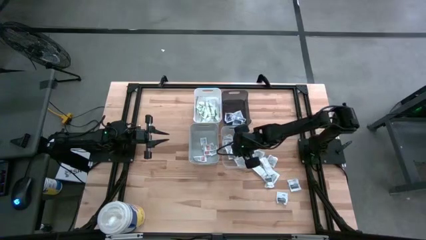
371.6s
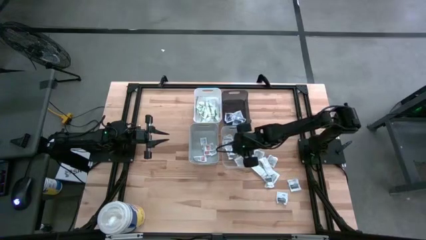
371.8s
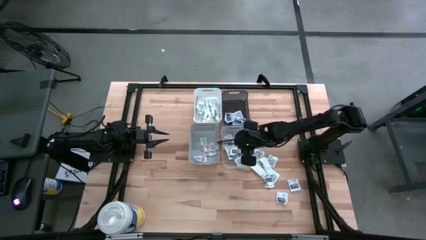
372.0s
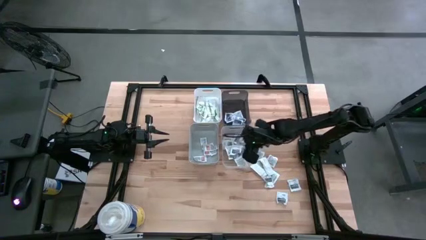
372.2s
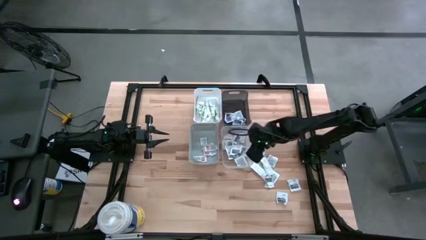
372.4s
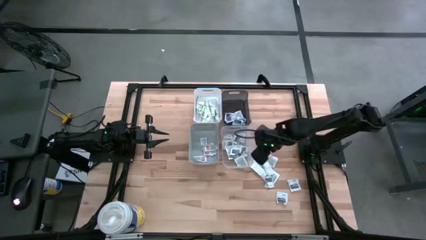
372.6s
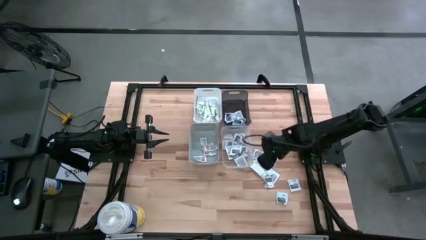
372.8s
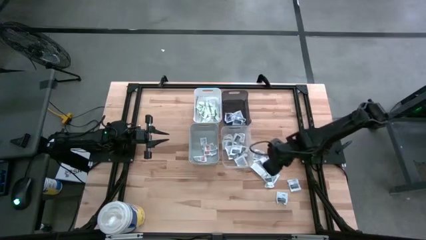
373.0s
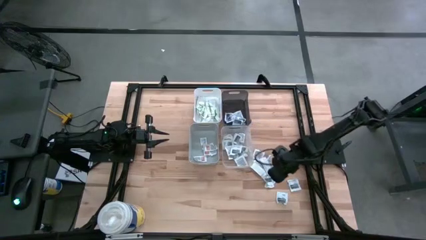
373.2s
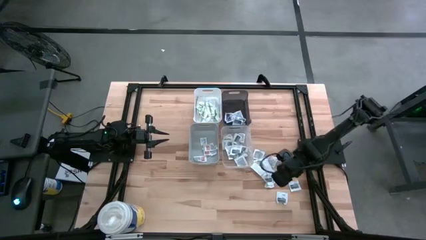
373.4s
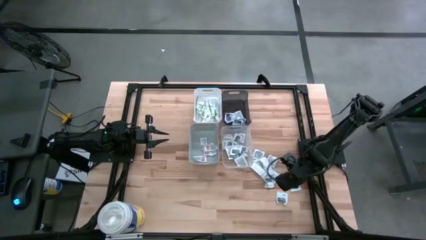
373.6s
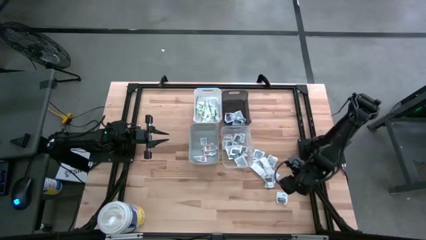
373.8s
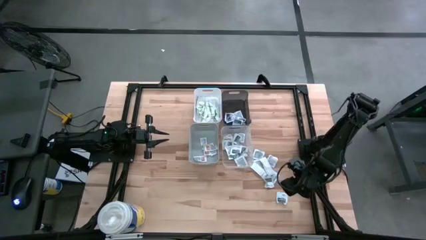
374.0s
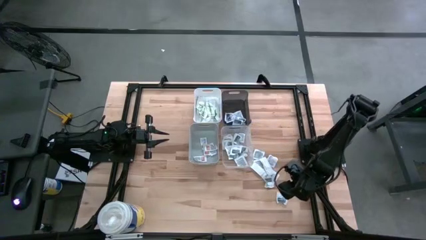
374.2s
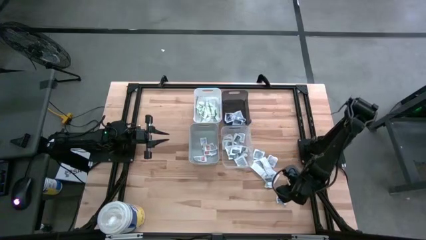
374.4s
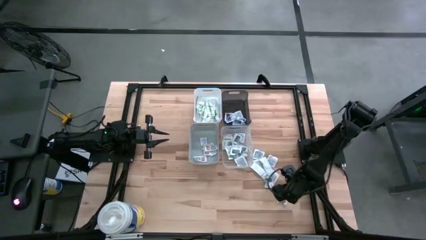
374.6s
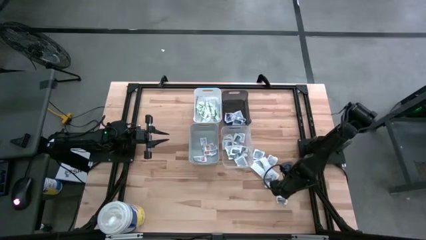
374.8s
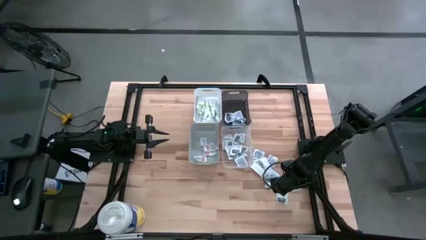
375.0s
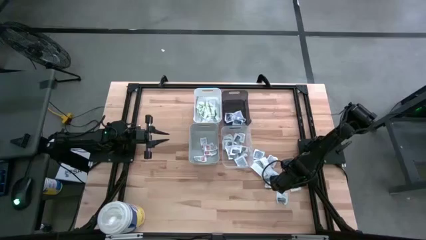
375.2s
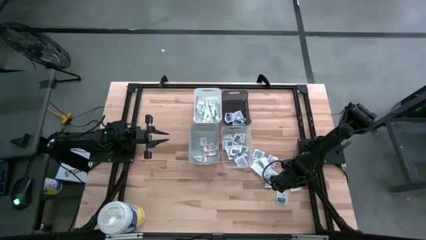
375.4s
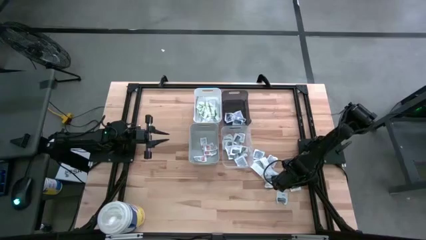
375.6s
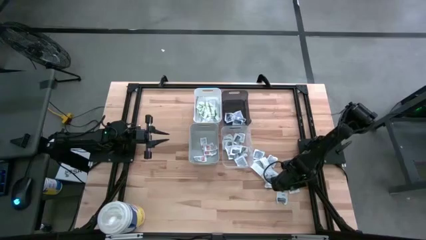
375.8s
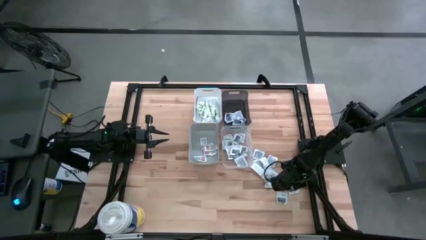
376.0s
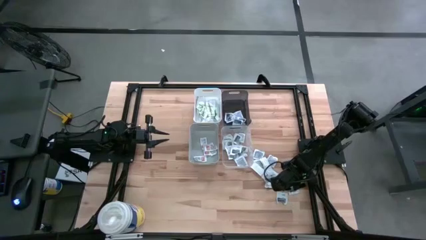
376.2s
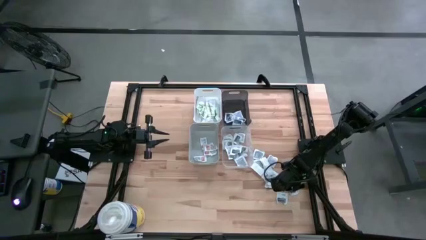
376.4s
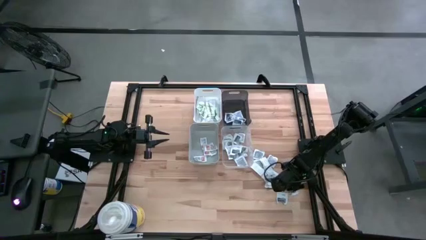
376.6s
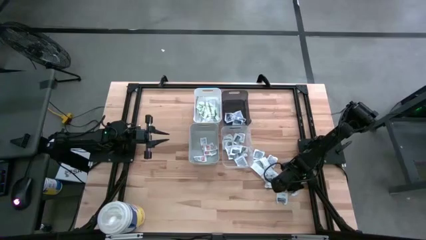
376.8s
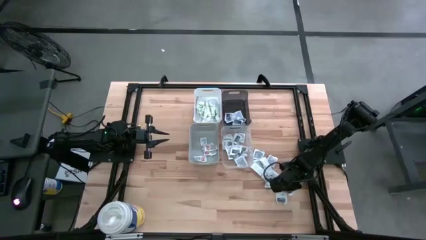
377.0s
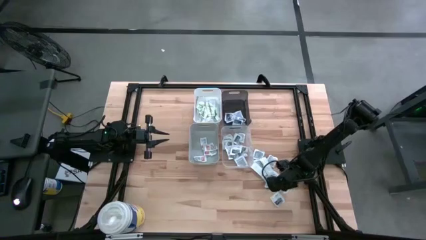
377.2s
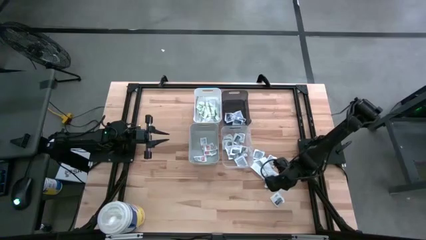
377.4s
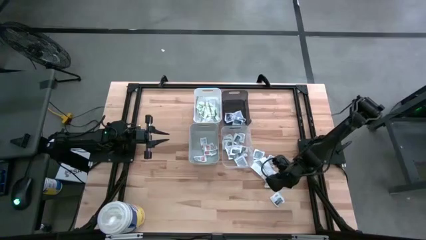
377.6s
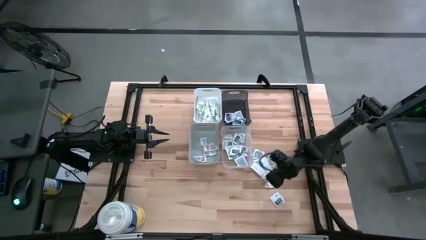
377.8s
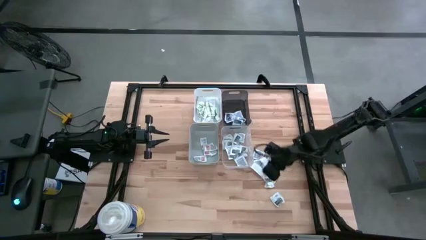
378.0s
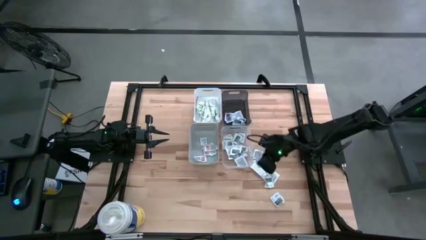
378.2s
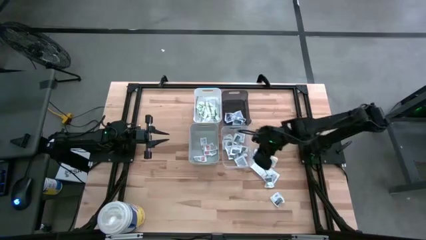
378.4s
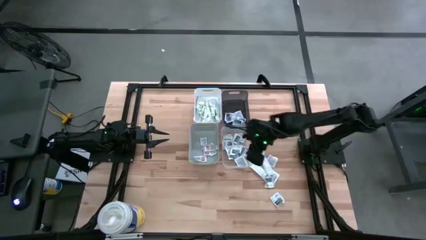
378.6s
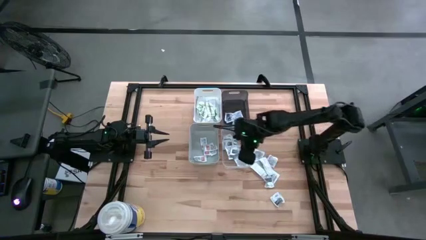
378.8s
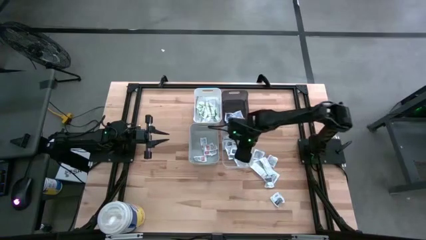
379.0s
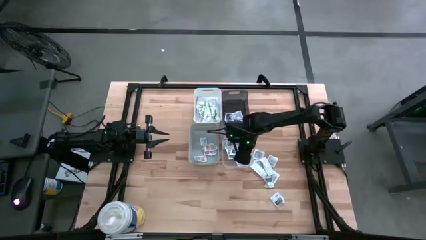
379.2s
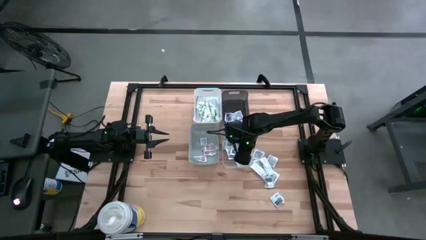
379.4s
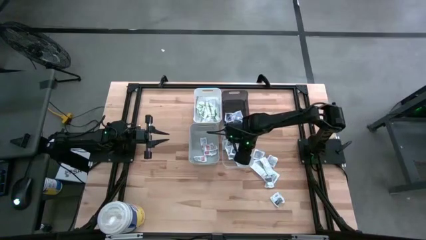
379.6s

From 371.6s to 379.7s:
Task: Pick & Place First Aid Supplies
Put the gray towelette pack into the transparent bin

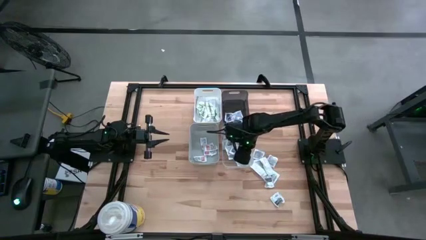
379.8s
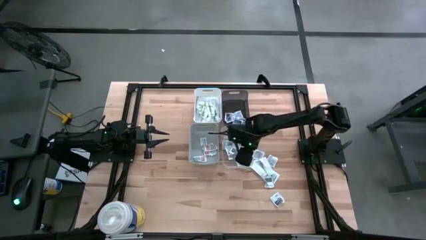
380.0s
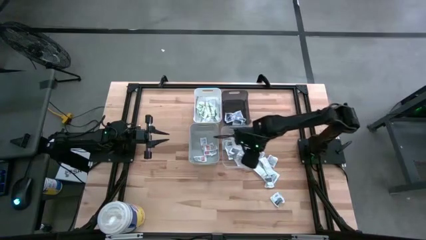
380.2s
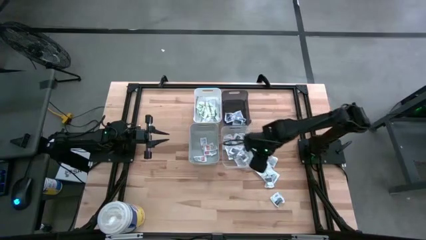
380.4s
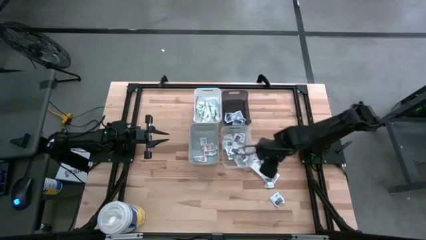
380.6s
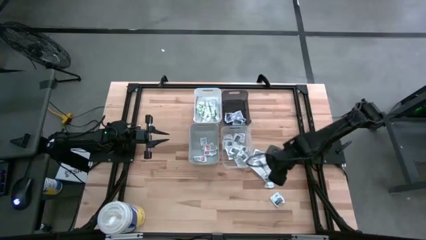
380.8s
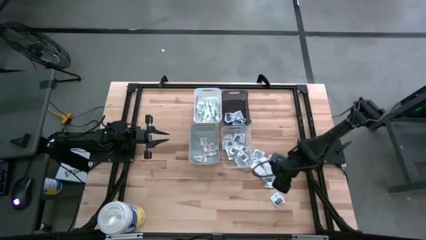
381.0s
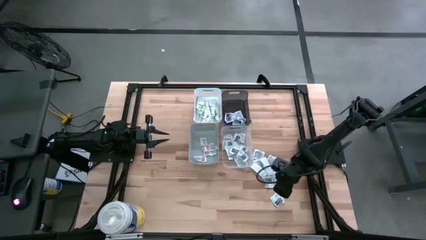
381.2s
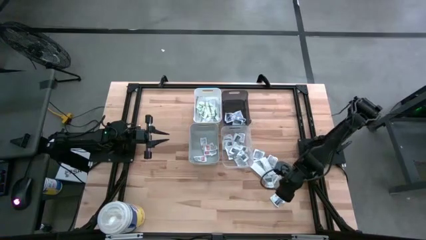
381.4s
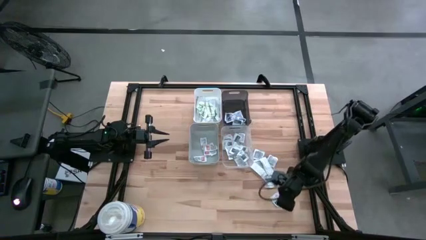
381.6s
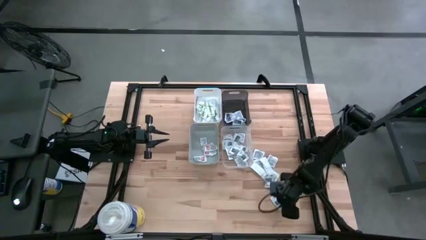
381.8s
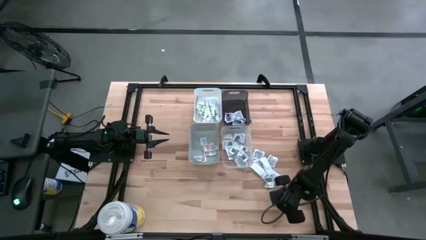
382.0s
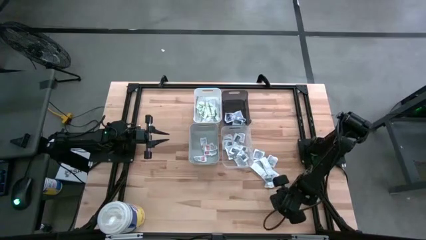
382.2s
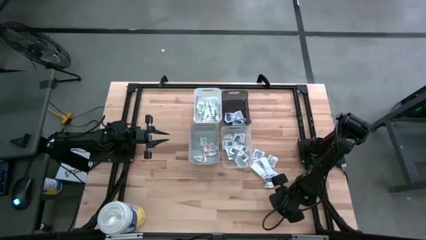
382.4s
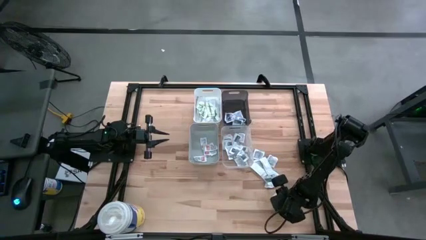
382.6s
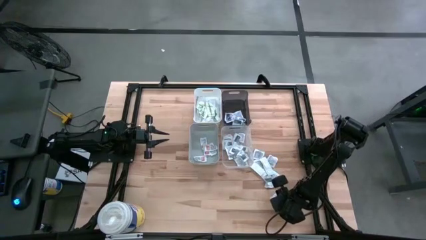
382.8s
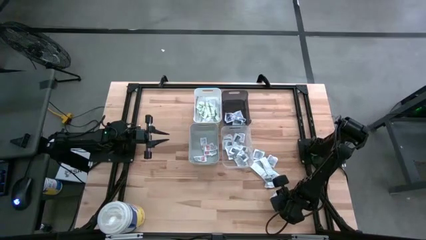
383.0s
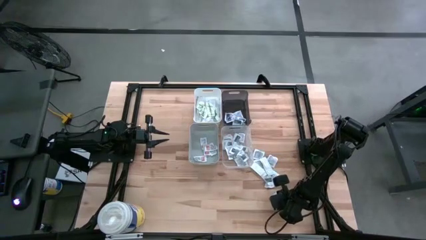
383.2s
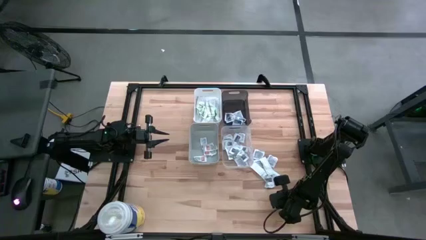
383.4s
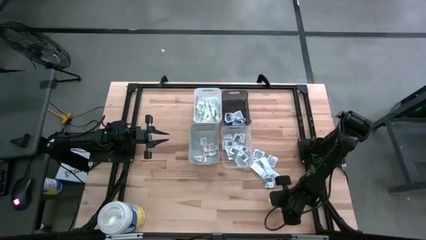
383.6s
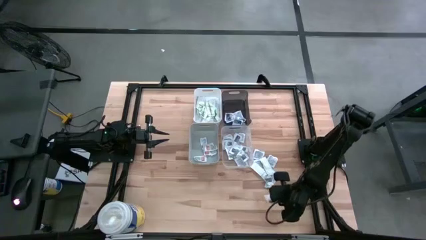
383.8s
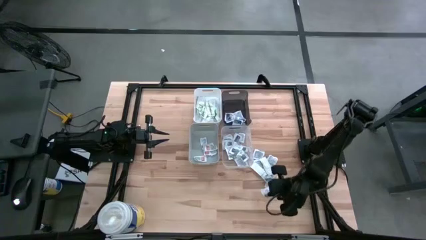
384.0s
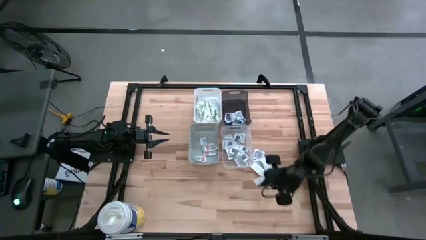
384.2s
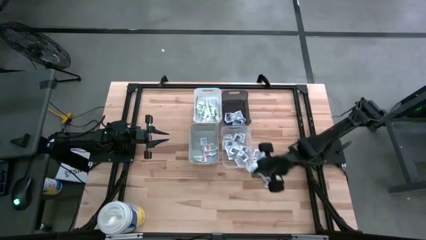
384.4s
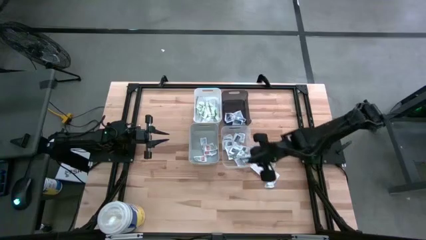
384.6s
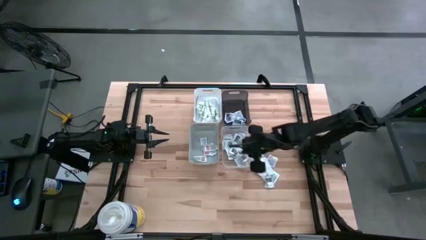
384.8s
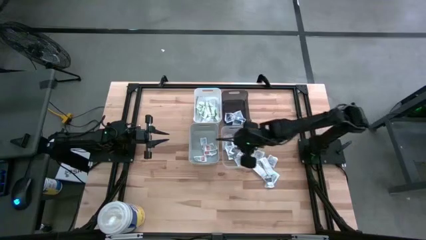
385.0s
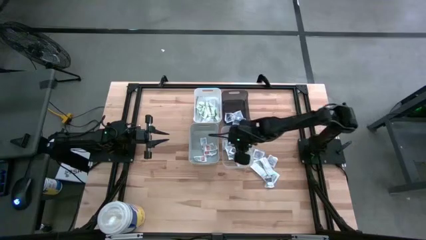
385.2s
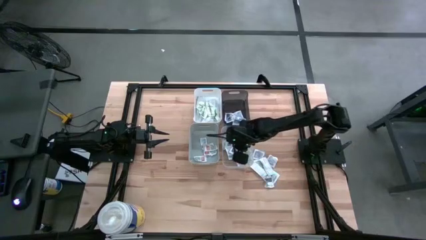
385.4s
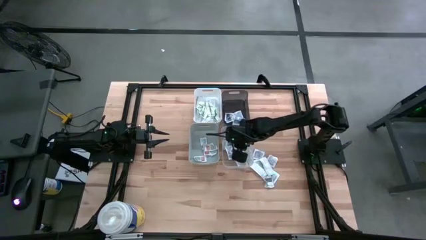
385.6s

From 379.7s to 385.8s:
Put the gray towelette pack into the transparent bin
